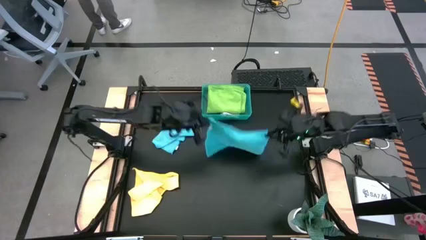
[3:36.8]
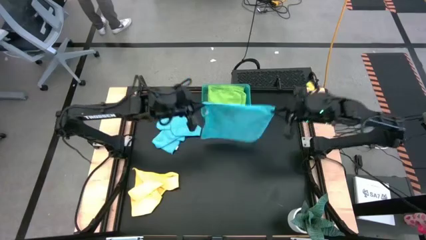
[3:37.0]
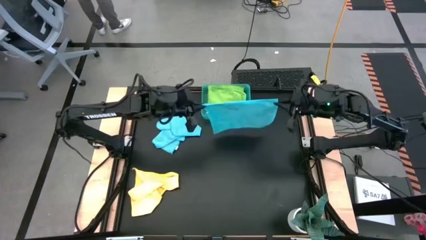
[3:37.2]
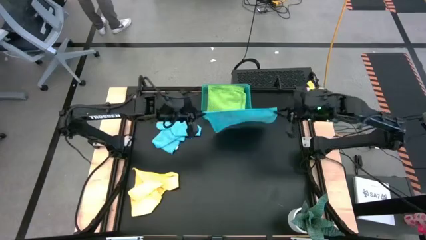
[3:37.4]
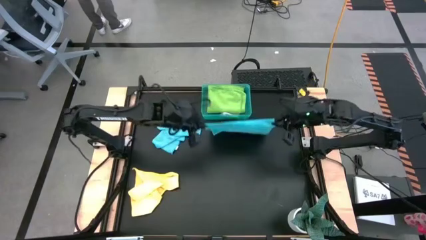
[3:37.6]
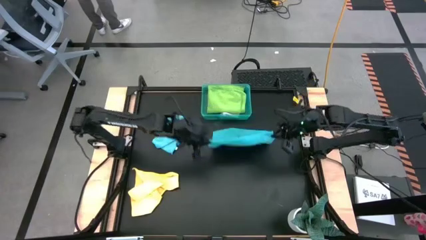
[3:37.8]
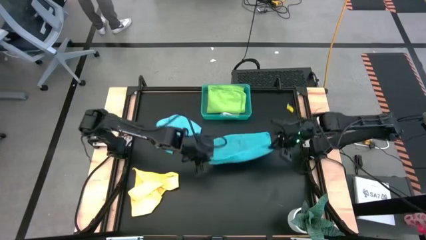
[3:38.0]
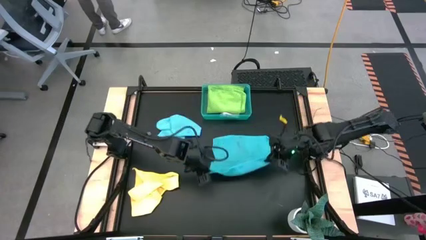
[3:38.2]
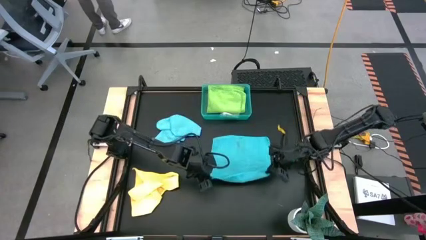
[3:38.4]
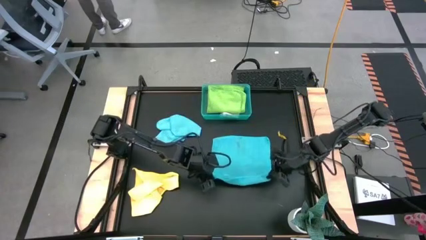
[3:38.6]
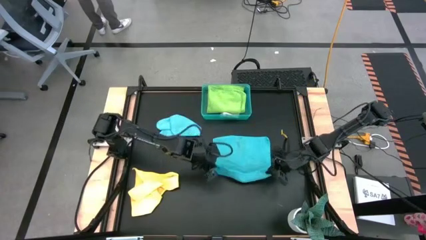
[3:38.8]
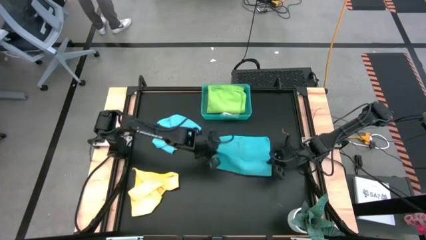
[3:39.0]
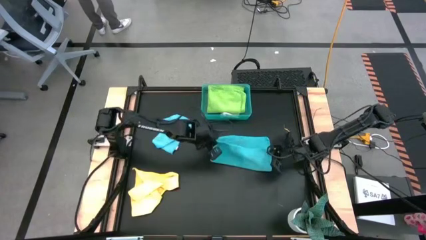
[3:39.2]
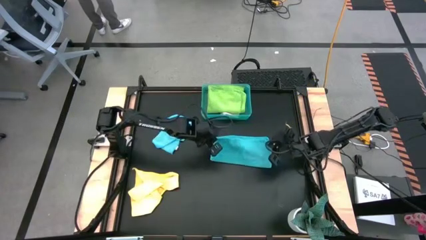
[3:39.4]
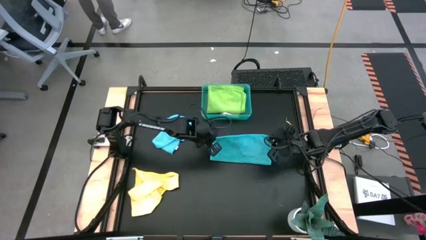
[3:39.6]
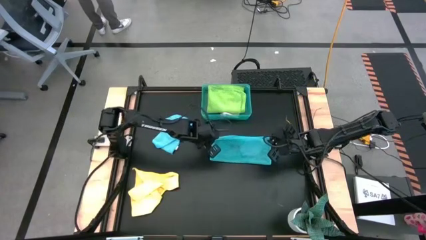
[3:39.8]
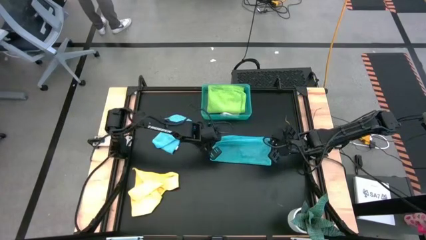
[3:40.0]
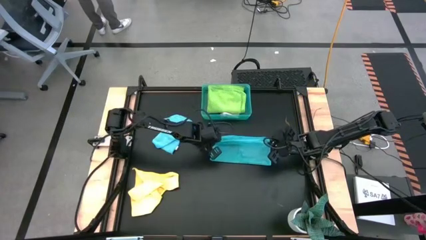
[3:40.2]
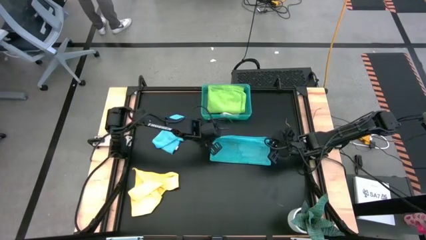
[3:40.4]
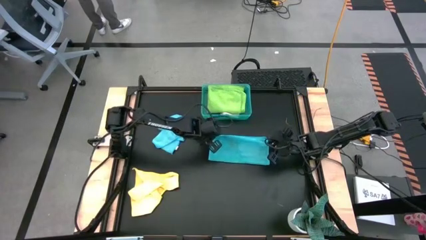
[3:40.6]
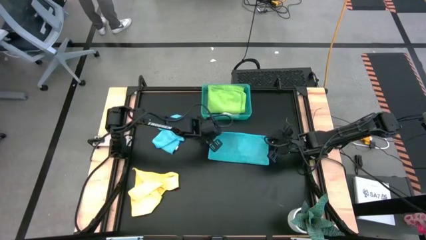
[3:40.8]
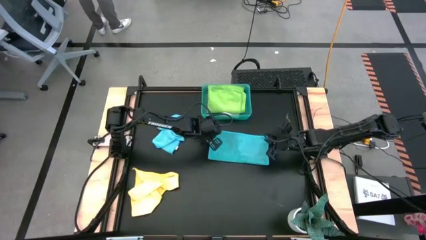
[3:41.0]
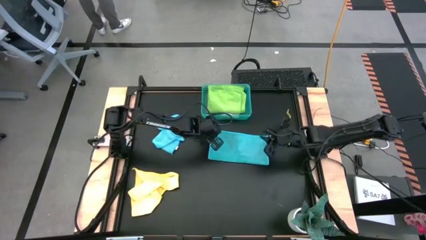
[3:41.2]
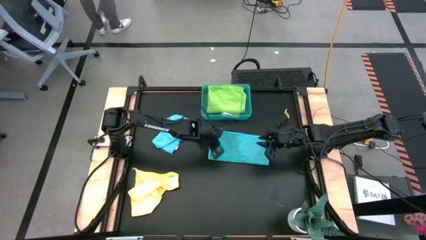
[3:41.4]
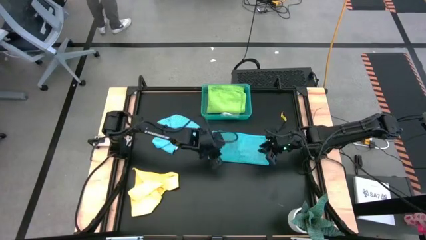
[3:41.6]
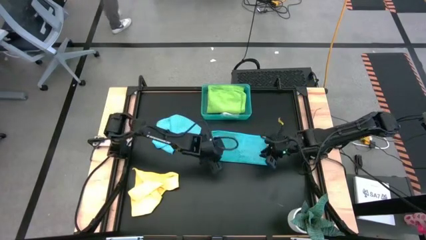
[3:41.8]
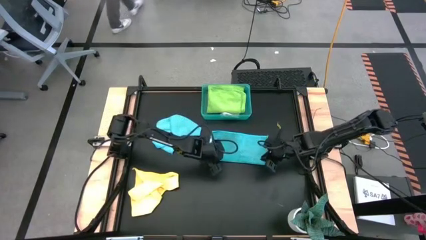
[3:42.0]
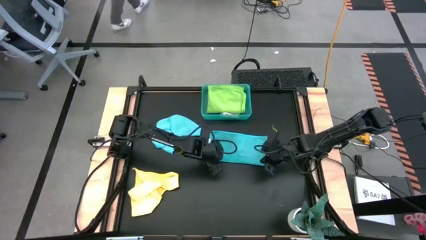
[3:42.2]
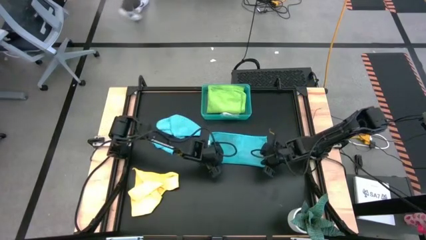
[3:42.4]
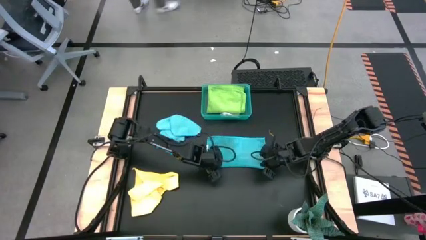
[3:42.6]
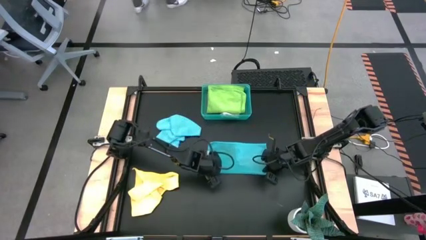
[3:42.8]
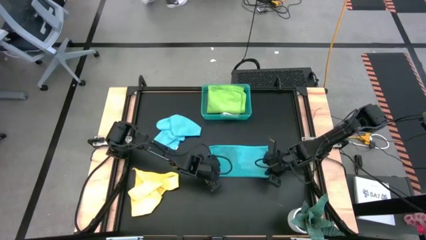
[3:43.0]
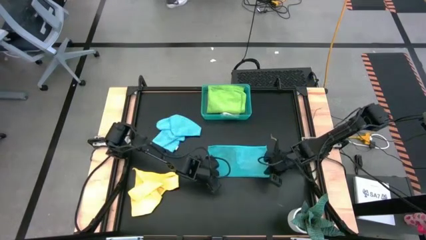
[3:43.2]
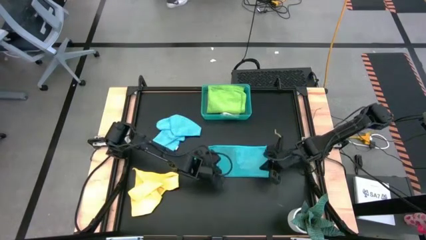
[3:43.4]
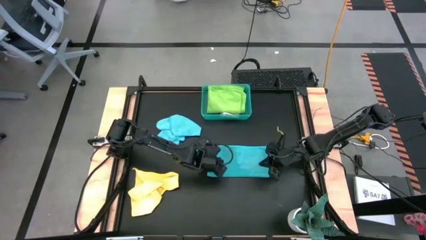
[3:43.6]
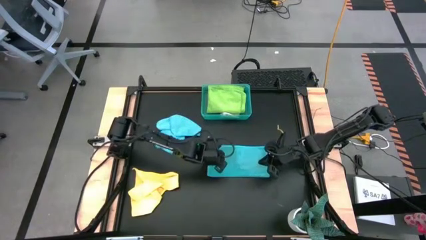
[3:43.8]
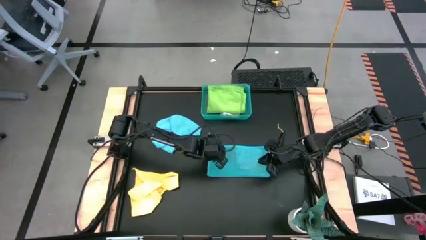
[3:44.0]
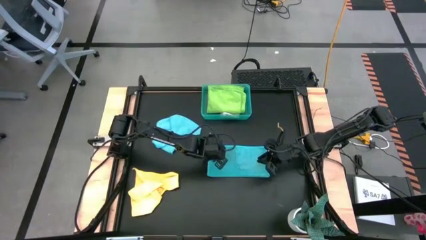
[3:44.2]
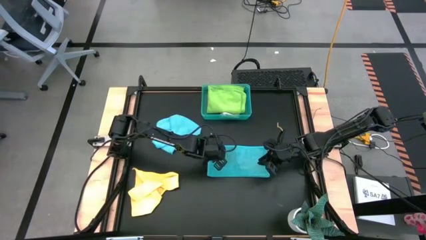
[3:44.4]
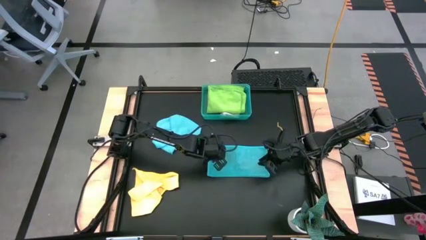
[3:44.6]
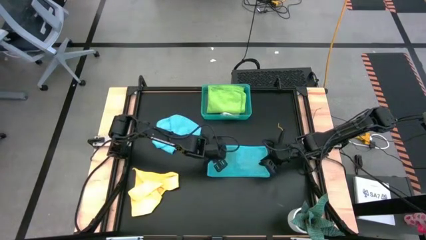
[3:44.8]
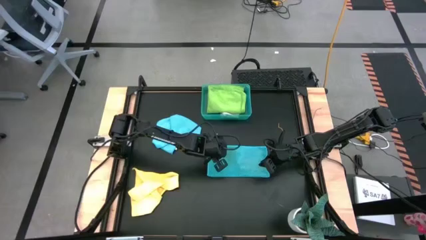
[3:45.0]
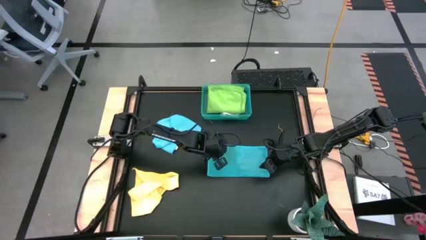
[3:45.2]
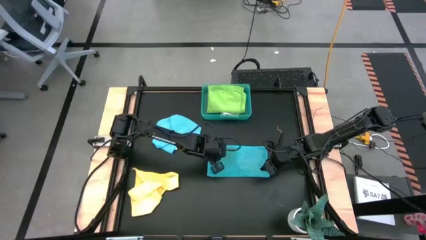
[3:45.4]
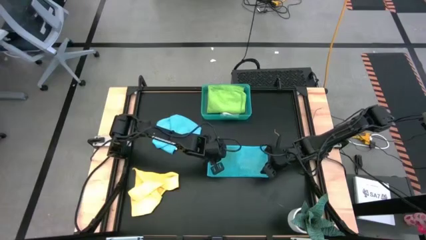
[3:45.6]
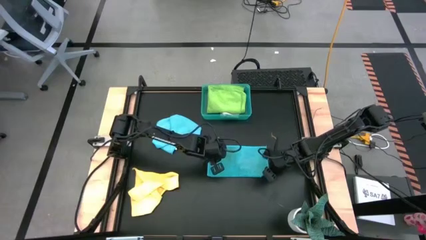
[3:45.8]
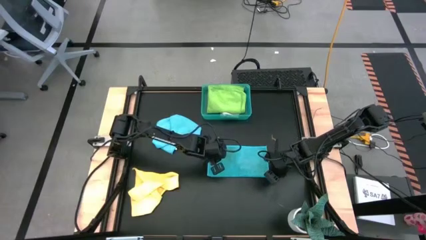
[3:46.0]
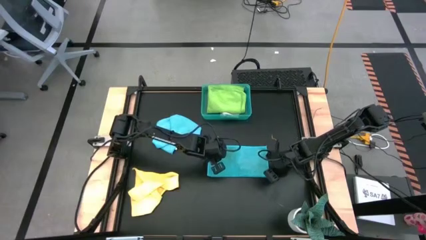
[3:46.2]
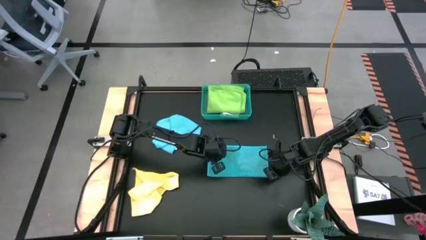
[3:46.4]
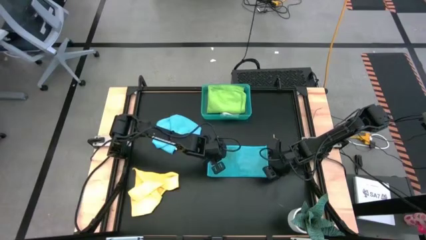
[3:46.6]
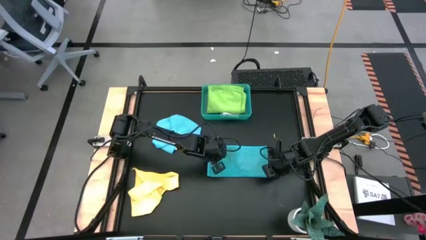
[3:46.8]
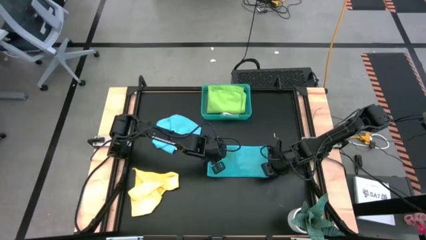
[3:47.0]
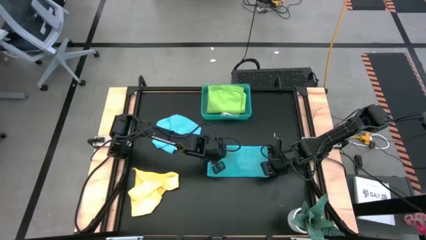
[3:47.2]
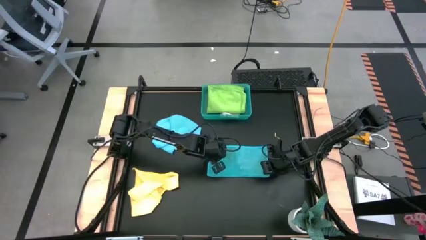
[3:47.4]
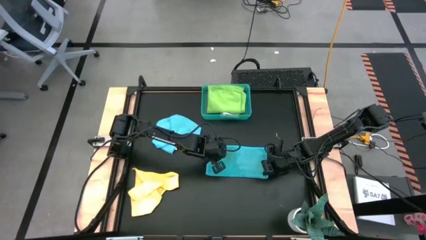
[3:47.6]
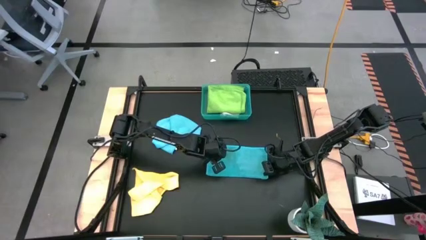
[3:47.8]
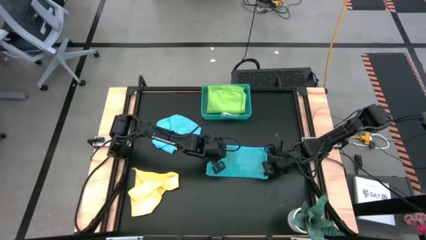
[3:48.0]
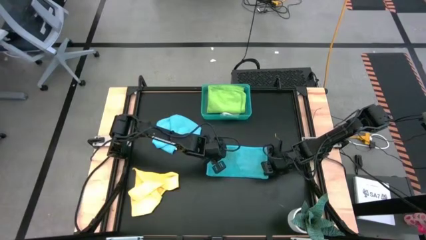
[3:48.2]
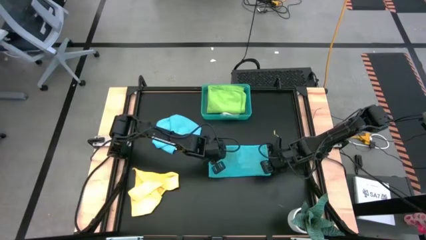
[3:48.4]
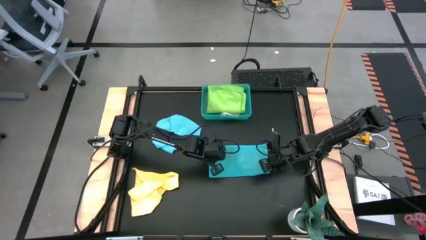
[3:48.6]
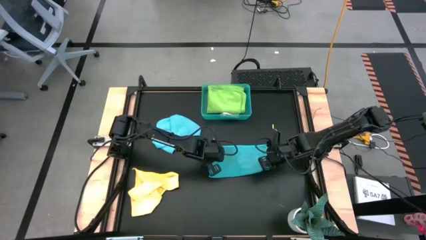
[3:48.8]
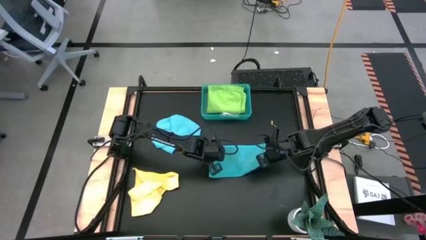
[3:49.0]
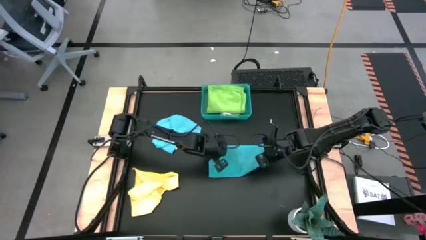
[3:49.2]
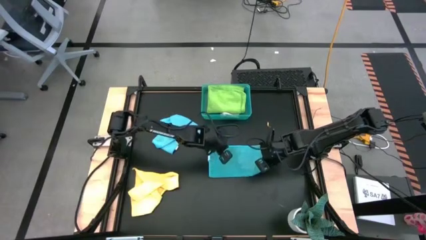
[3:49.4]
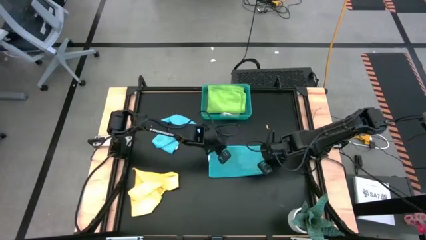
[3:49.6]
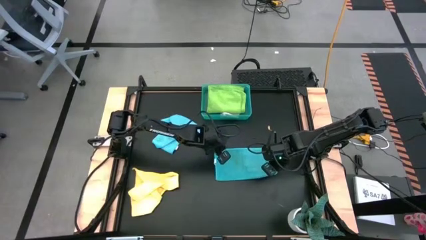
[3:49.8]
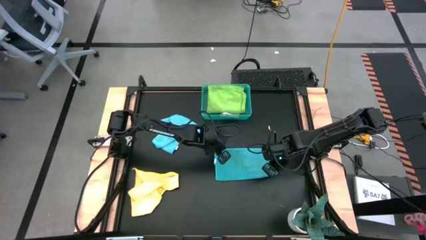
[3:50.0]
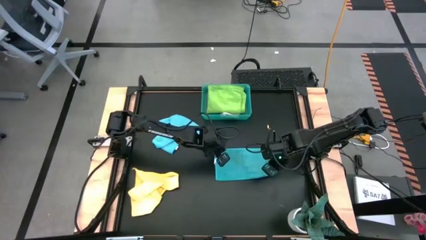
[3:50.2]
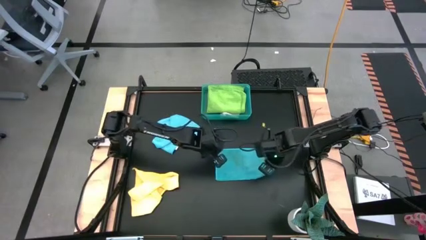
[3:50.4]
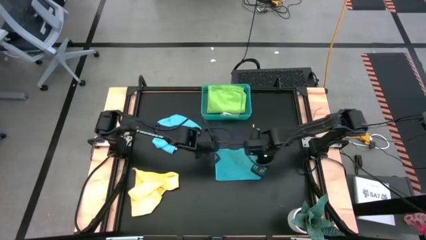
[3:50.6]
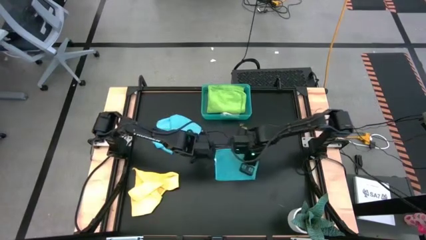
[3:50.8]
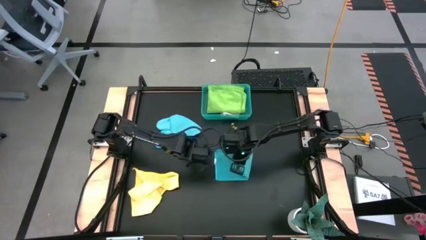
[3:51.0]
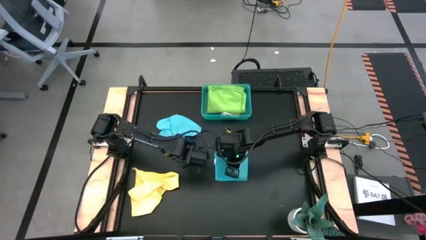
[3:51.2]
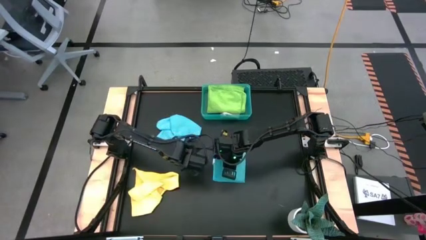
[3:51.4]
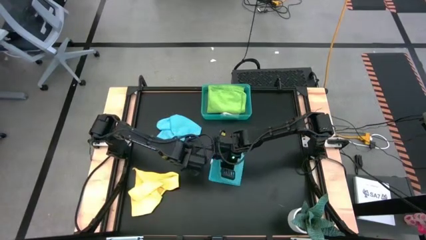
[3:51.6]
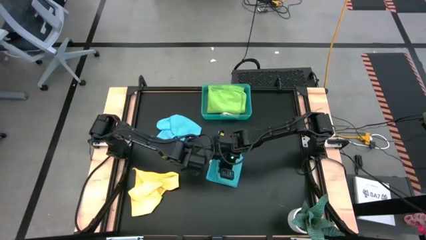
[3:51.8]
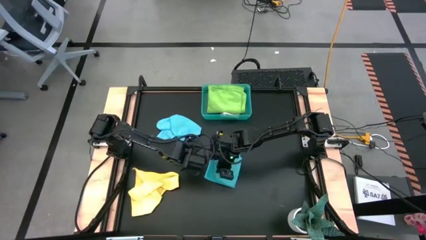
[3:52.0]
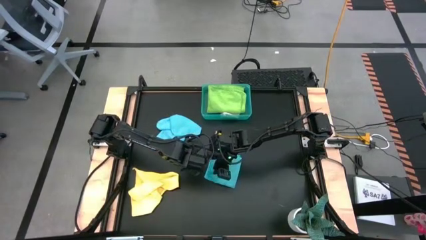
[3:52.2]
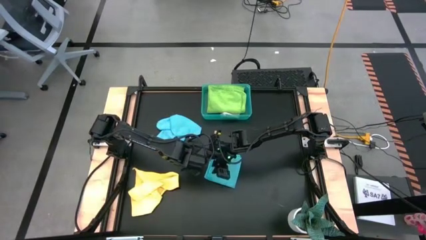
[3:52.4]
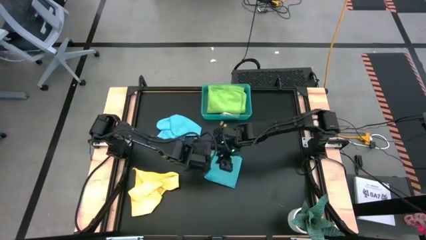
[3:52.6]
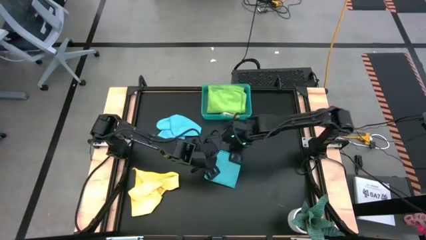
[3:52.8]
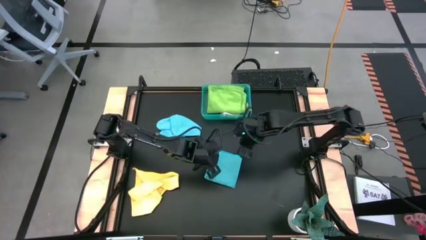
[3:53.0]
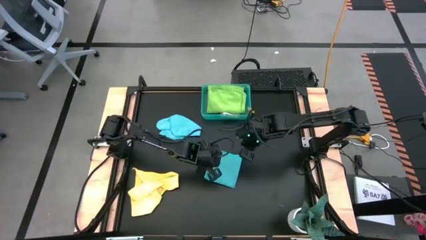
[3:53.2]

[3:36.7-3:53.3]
Task: Fold microfiber towels
Fold the bottom blue microfiber towel
